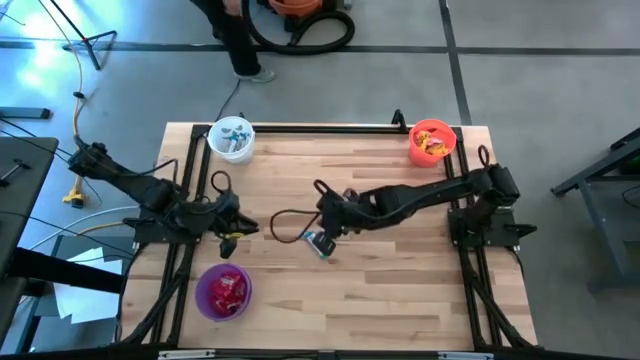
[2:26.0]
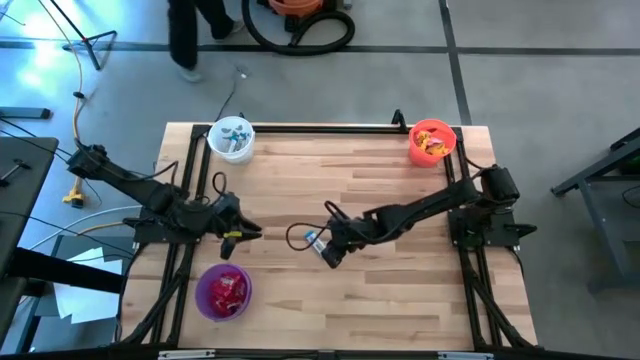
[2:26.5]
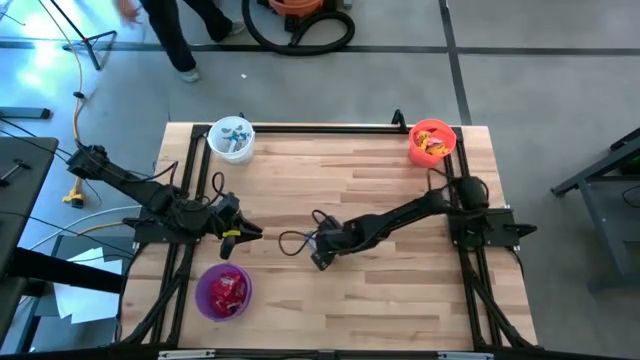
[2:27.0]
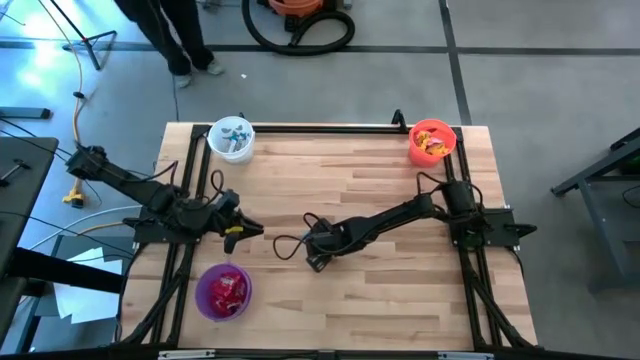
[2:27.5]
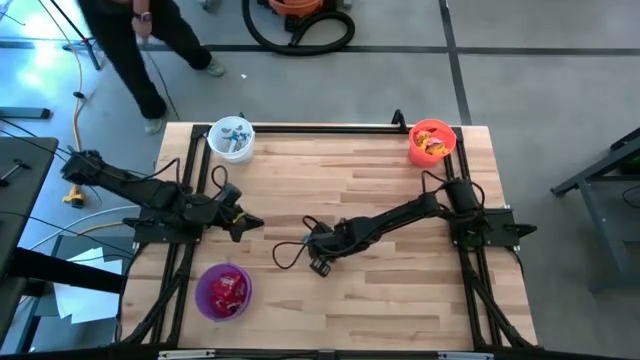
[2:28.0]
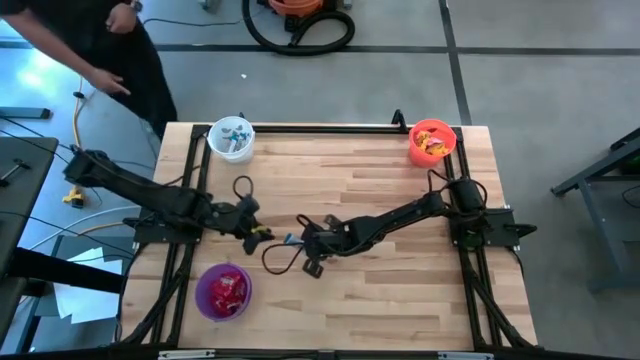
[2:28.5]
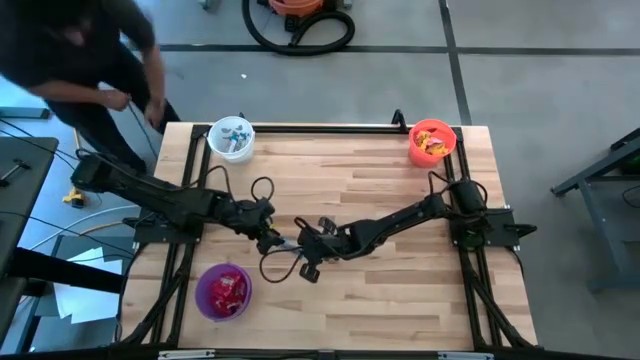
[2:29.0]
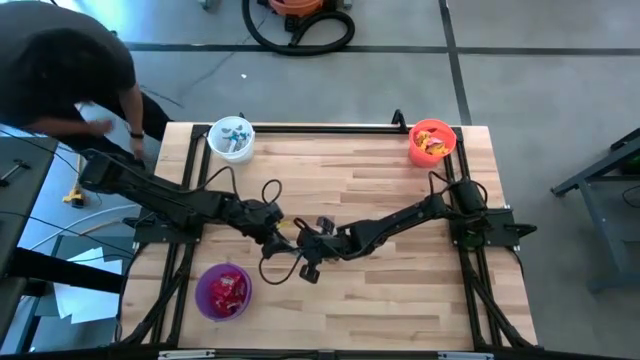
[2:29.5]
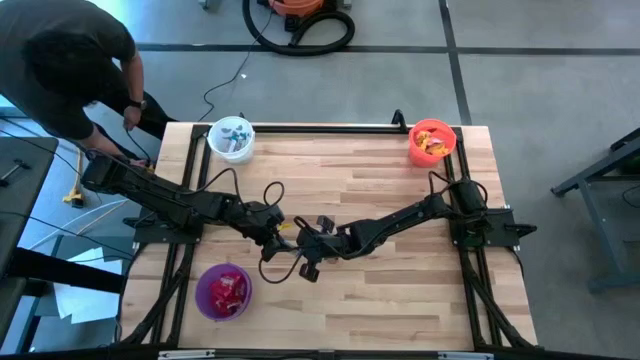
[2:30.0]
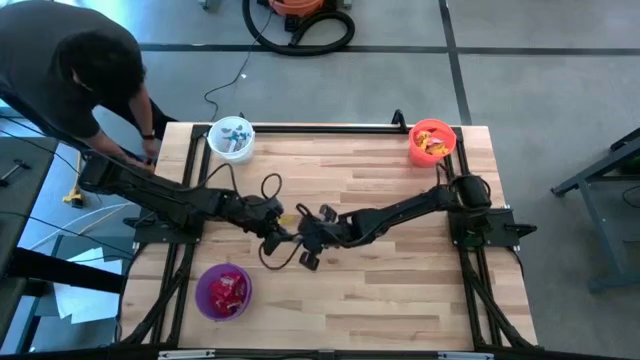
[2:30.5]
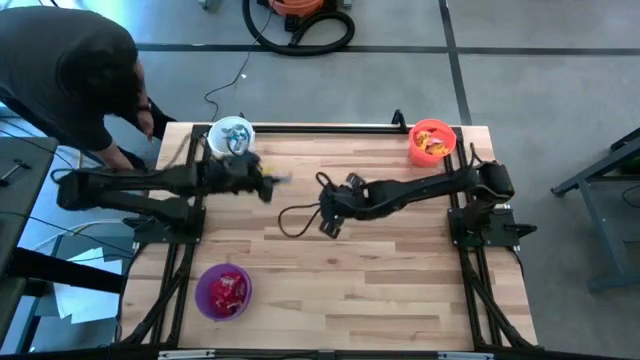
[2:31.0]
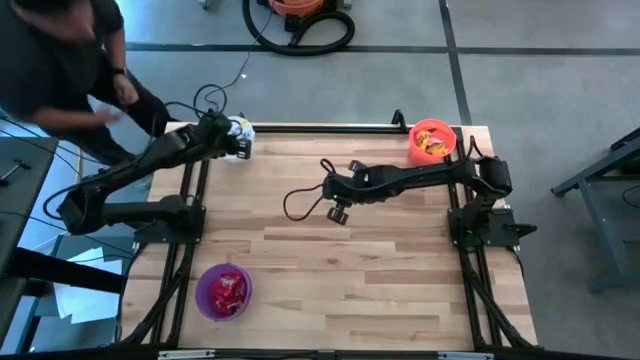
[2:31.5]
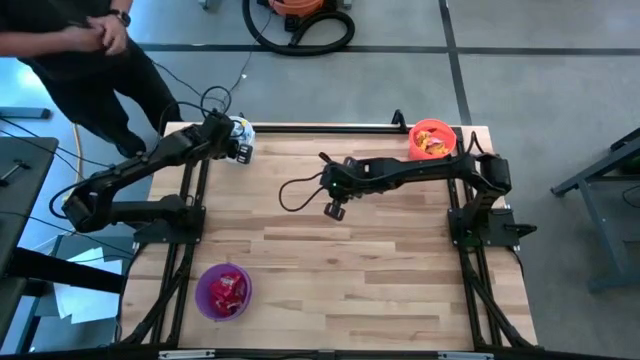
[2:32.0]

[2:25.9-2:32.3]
Task: Sort candy
Put the white candy into the white bucket

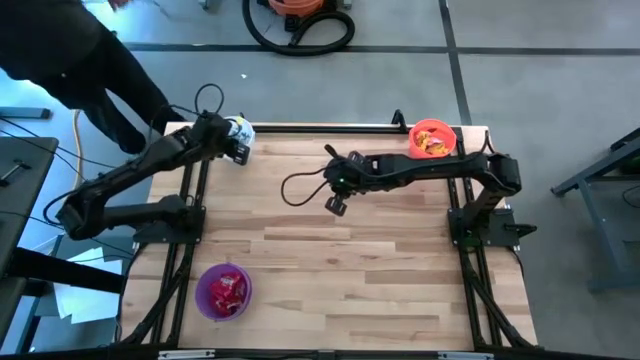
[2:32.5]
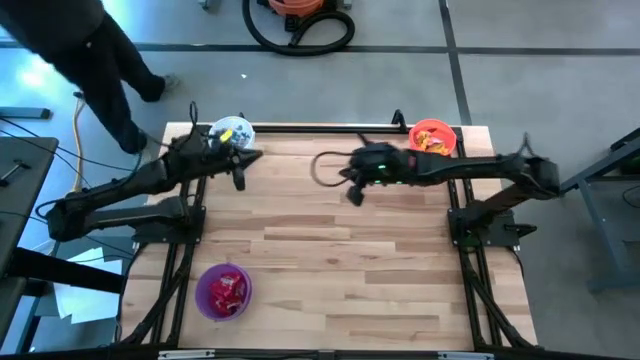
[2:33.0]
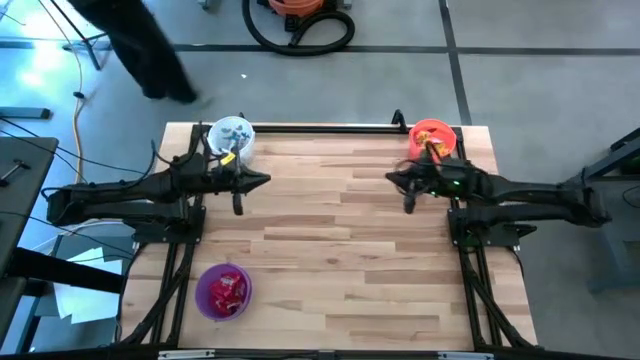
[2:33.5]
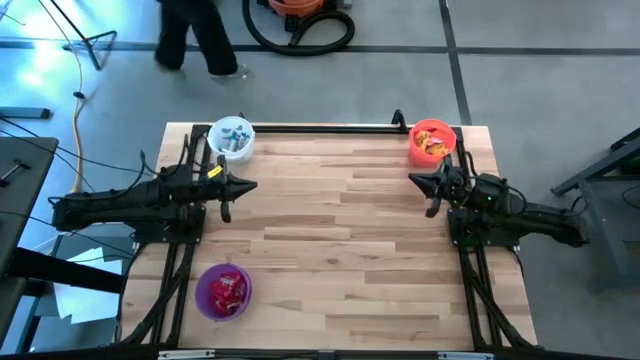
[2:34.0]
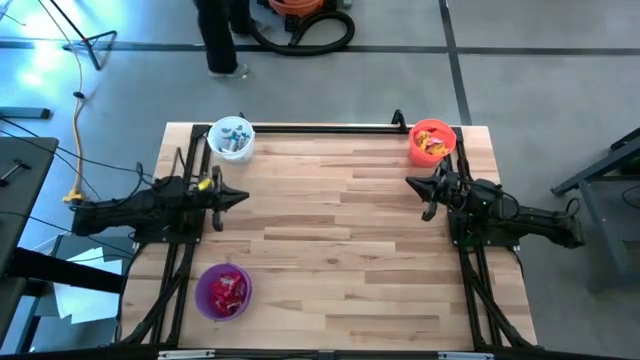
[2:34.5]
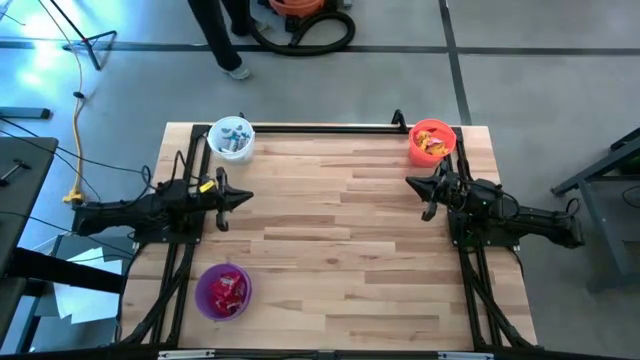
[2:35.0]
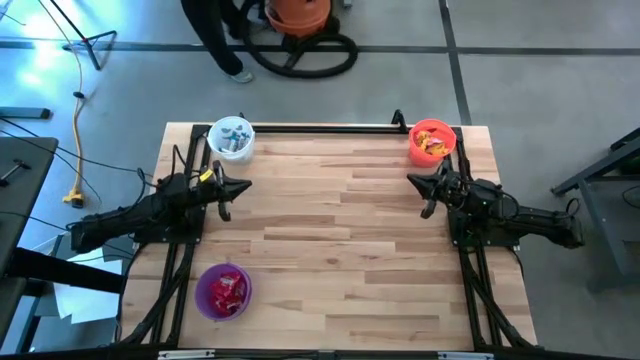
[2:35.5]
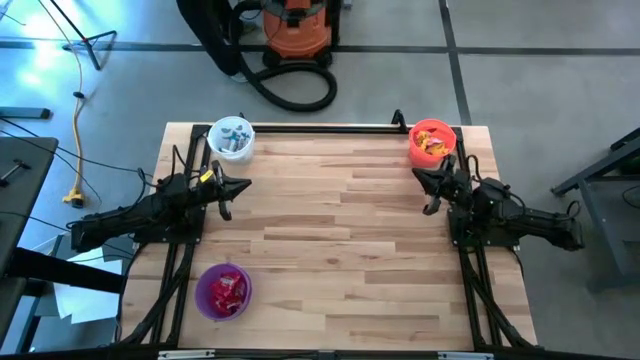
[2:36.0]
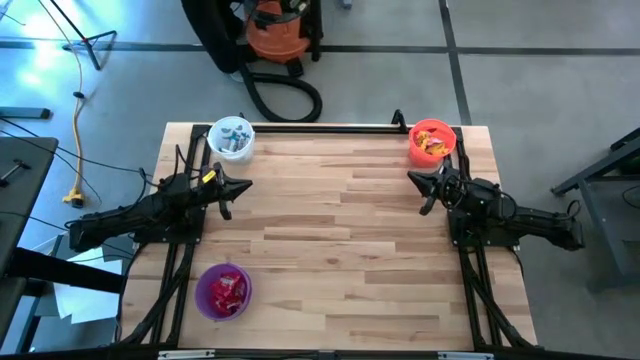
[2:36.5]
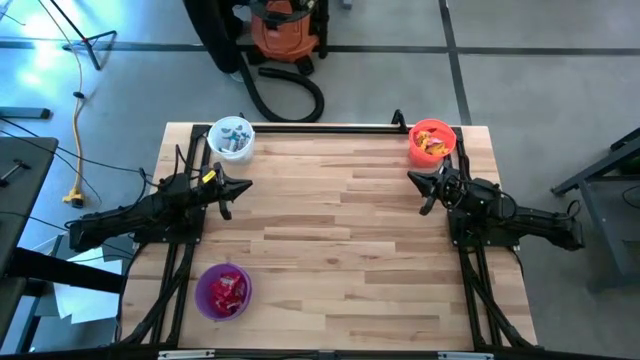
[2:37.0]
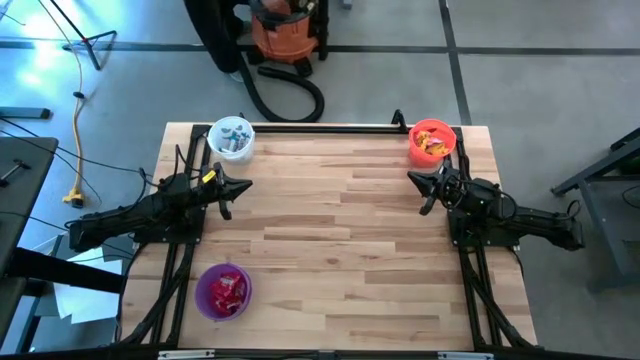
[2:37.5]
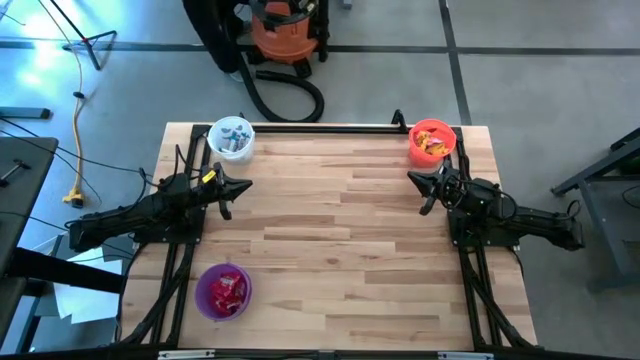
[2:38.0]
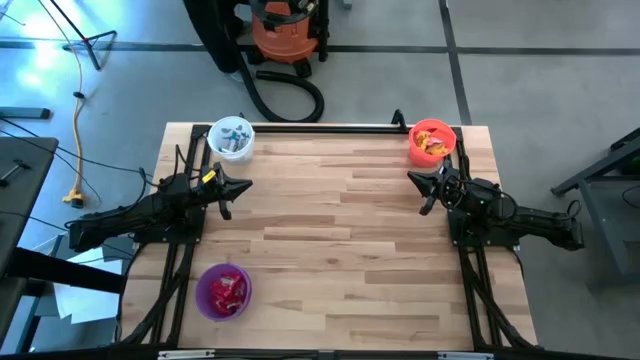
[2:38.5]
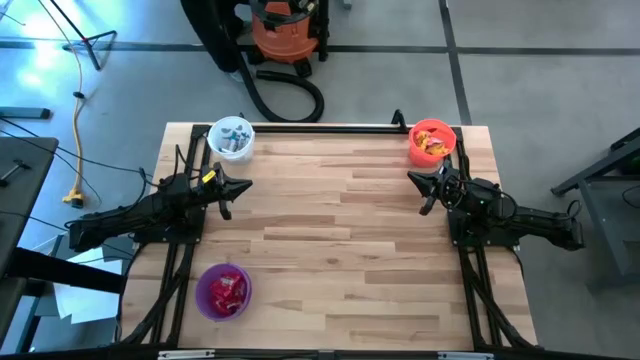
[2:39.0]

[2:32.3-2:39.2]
Return to Home Position

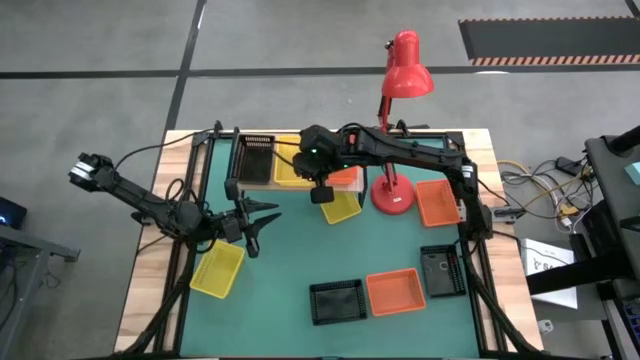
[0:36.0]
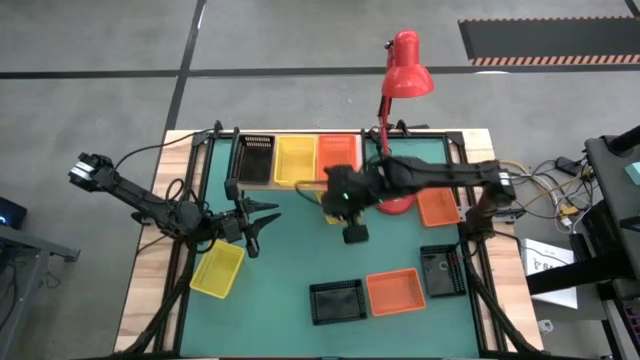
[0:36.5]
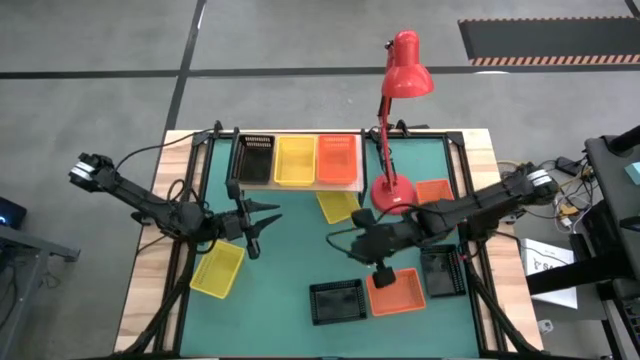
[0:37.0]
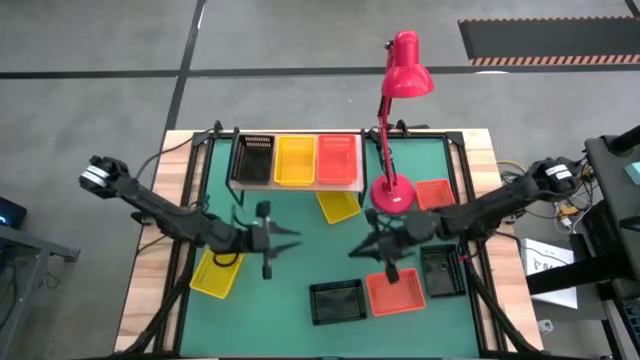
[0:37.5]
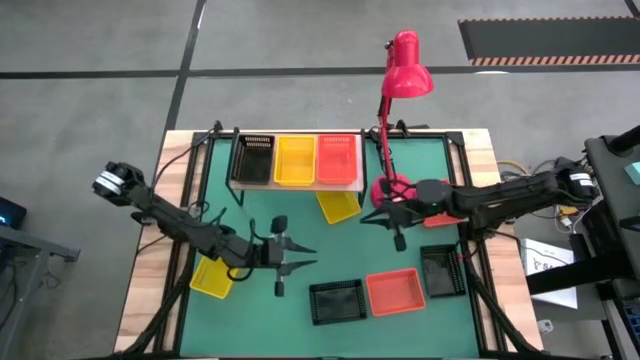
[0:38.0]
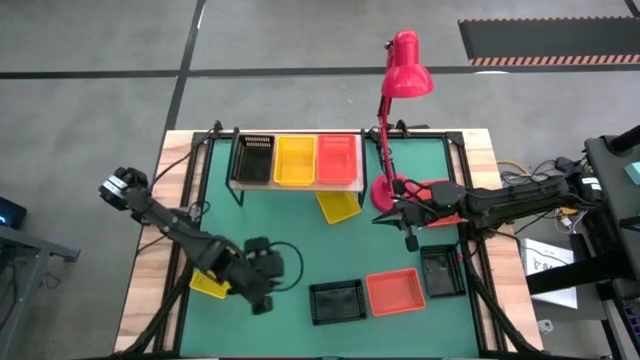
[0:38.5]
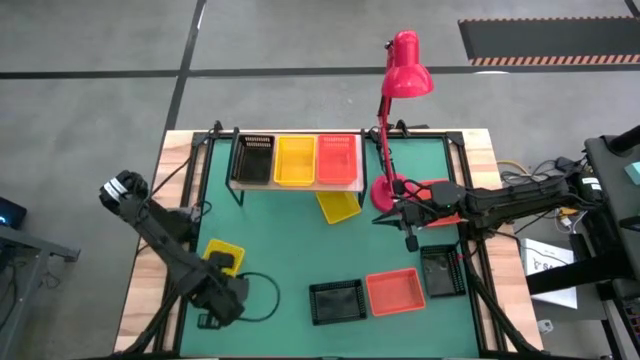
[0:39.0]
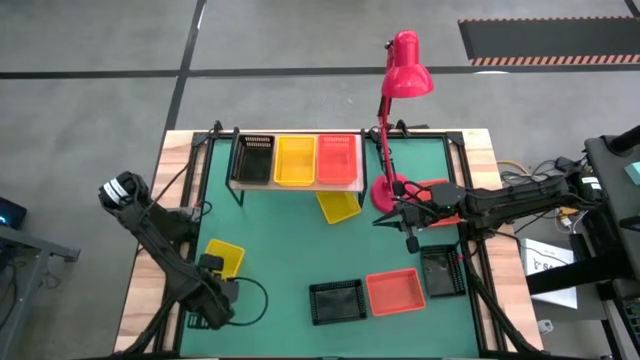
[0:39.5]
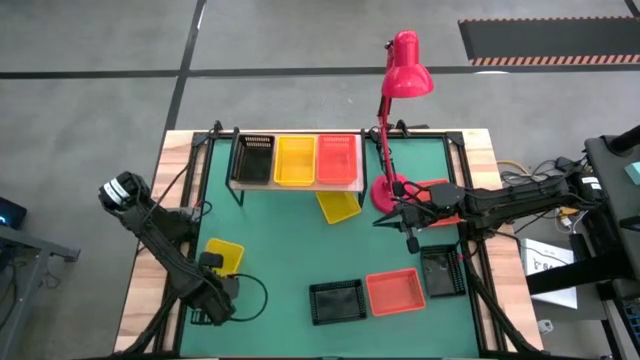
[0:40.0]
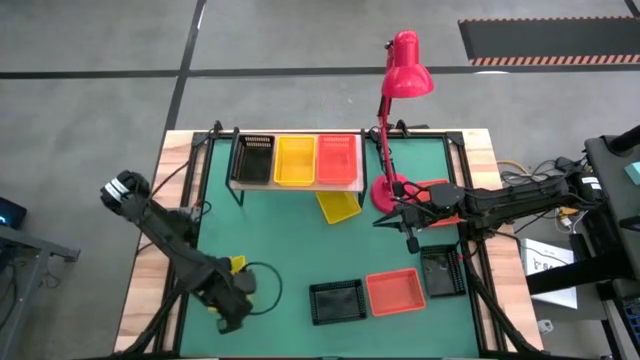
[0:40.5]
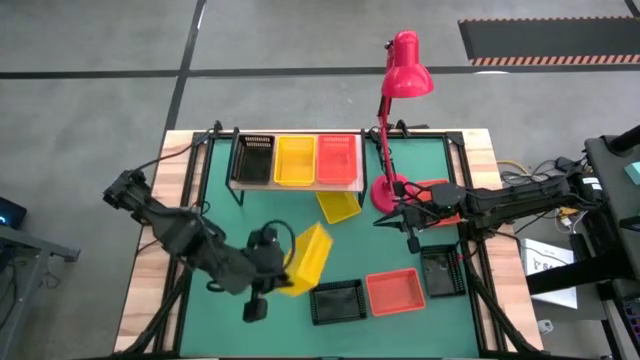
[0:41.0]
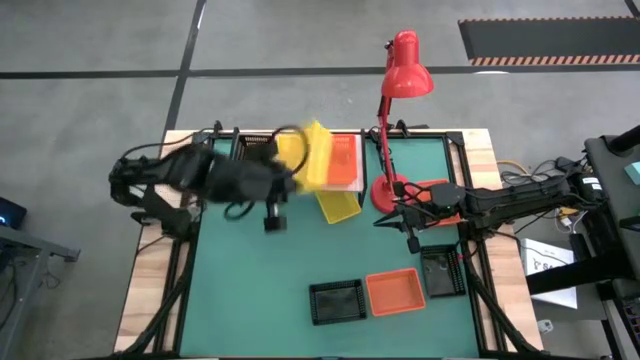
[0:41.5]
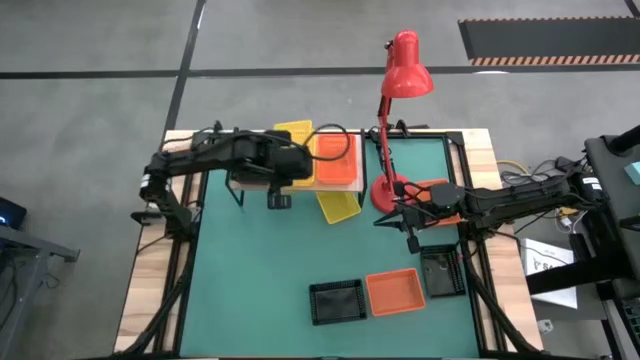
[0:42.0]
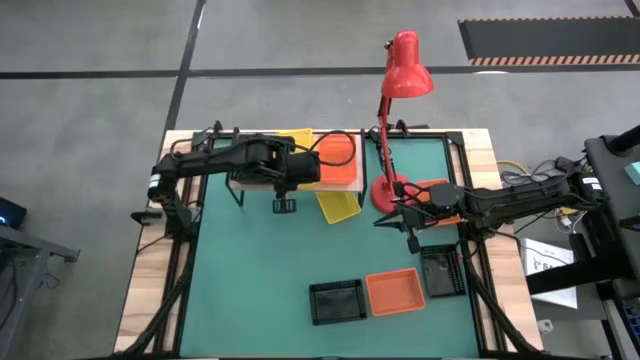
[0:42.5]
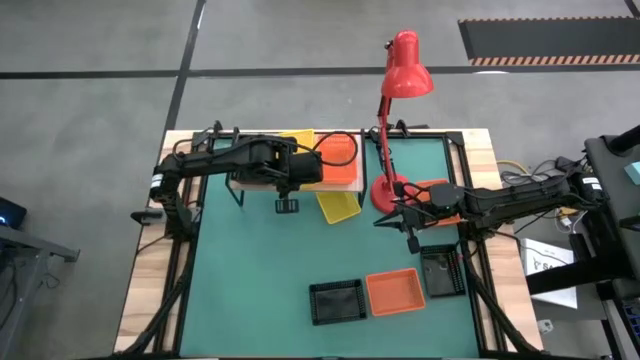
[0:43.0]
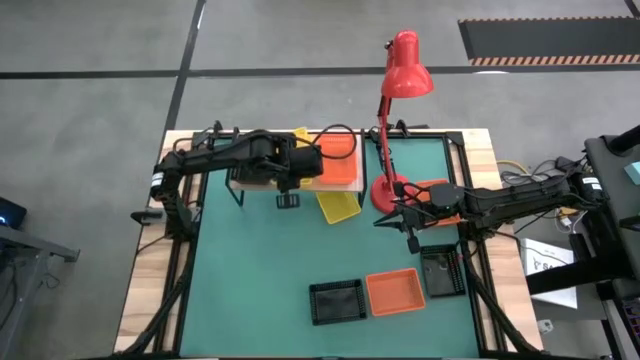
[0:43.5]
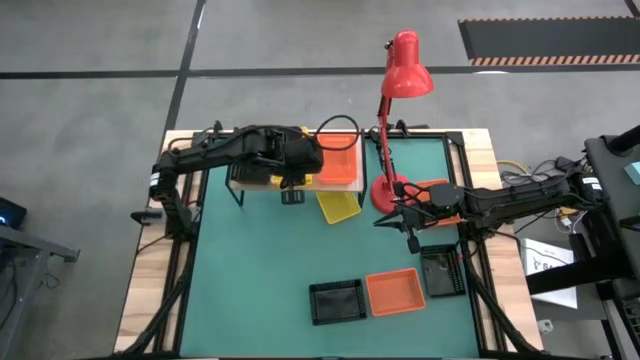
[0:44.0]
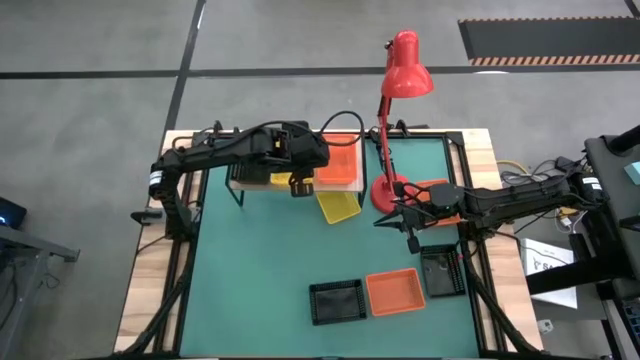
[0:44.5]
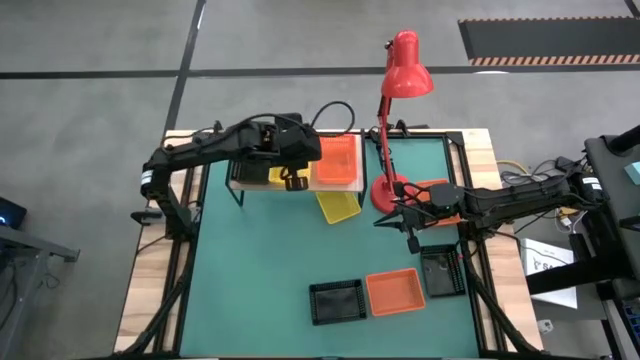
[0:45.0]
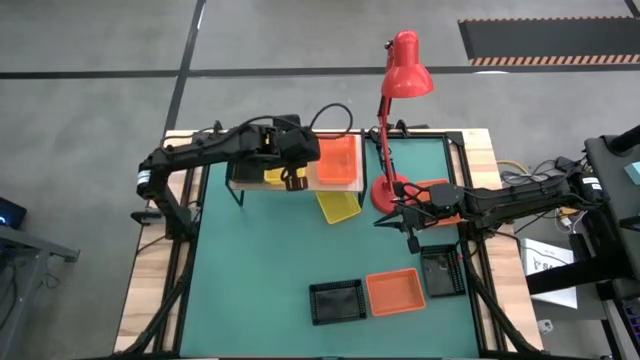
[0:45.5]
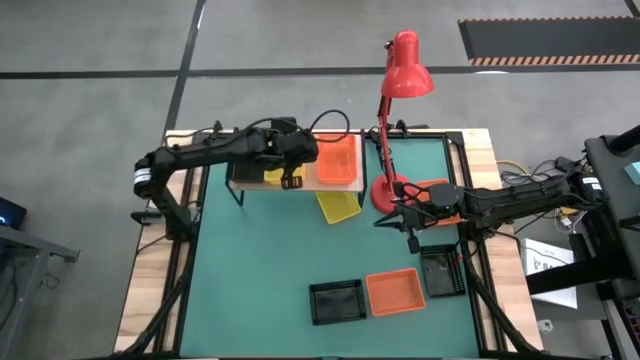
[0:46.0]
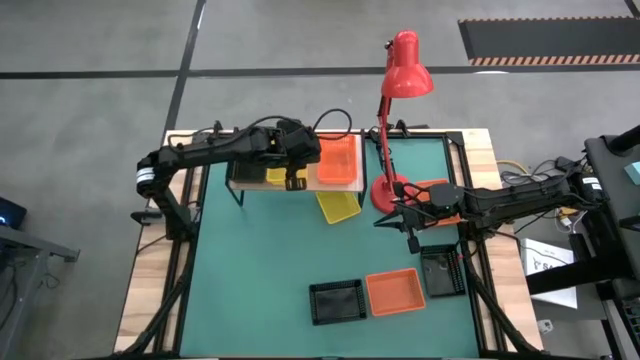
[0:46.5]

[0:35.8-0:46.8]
Task: Stack baskets on shelf by color
Stack the bottom yellow bin on top of the yellow bin on the shelf
